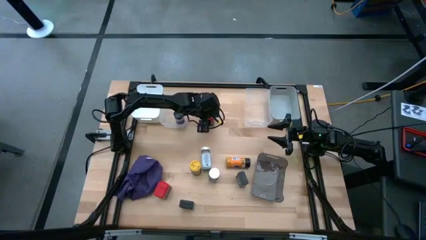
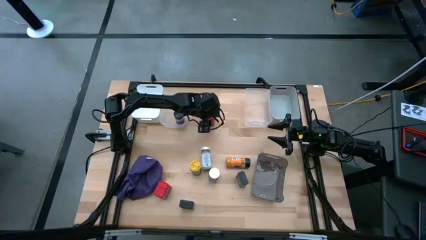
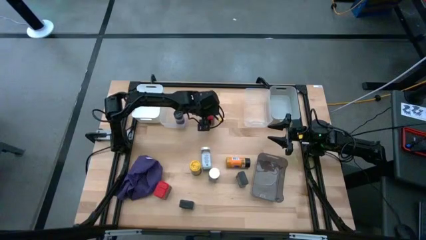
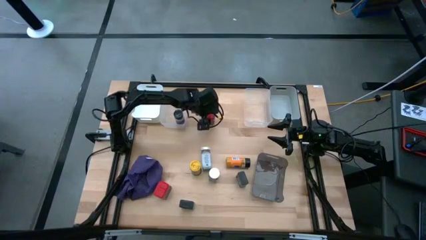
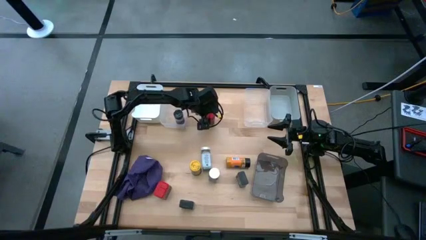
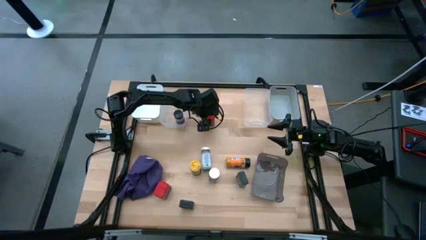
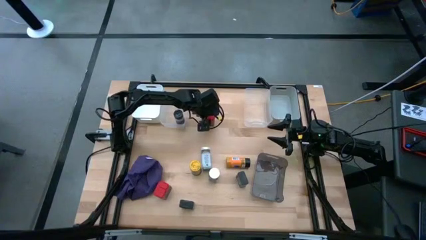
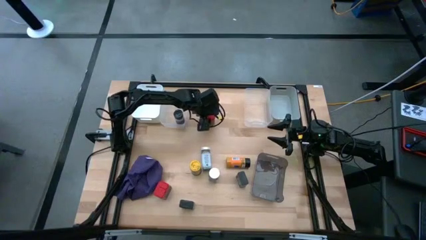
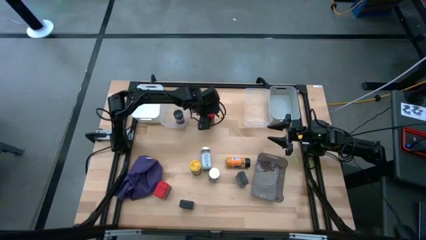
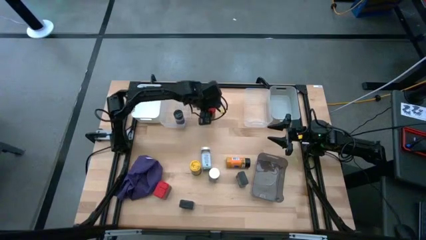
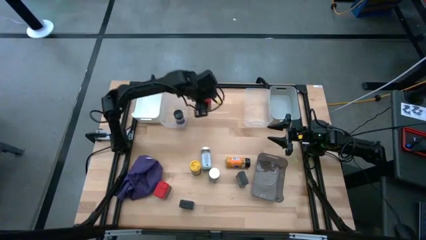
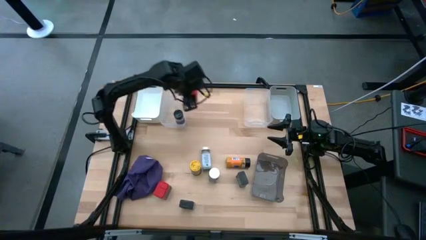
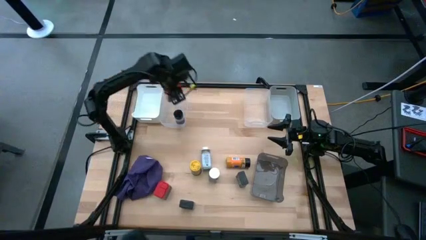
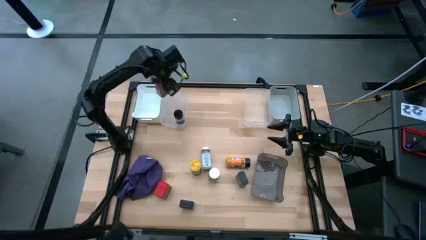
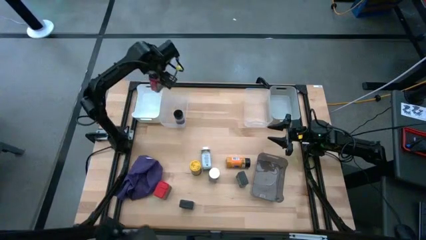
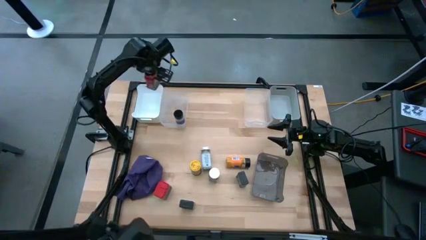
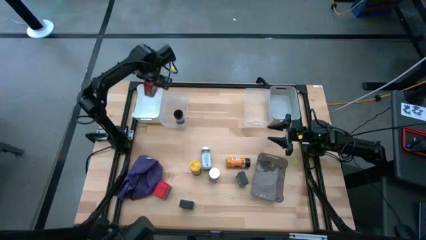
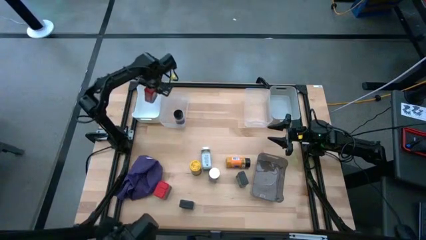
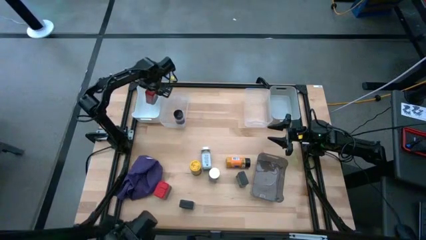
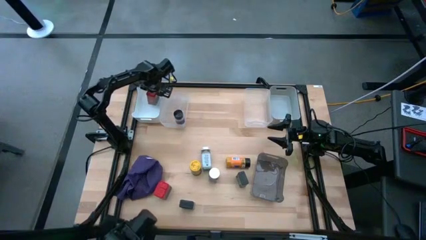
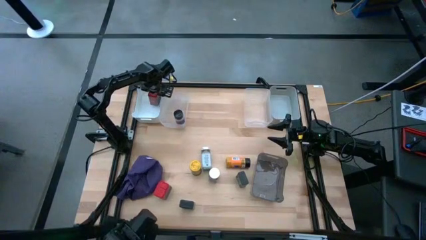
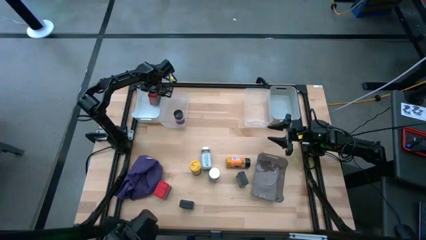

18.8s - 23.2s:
Task: Sort spices by type
Put the top red seasoning can into the white bin

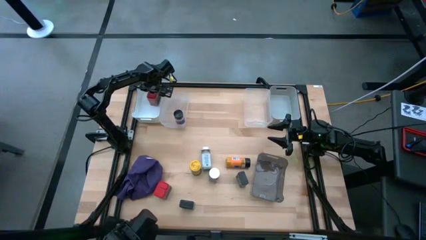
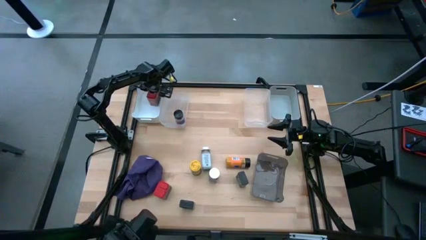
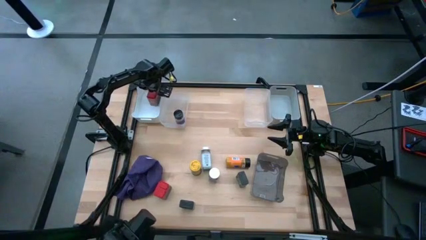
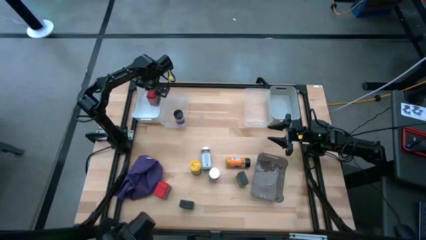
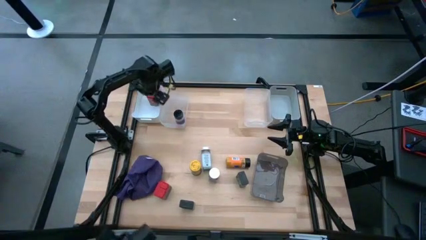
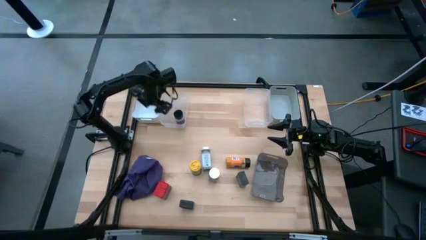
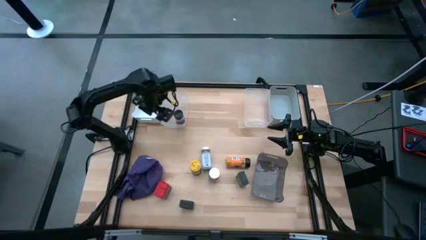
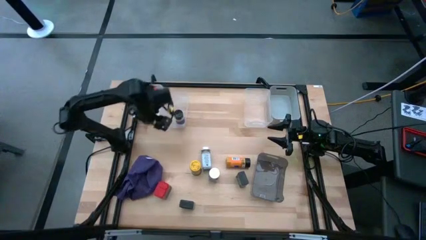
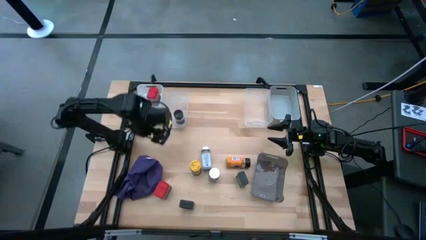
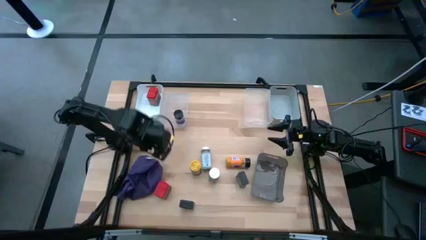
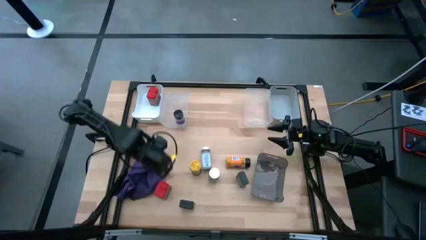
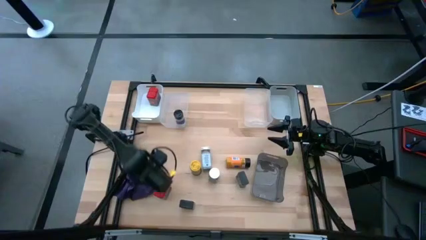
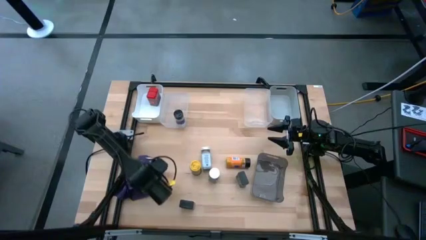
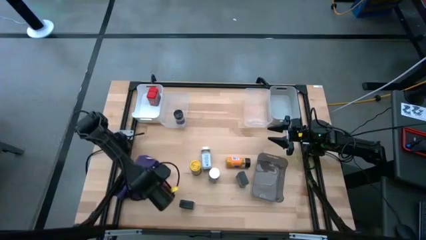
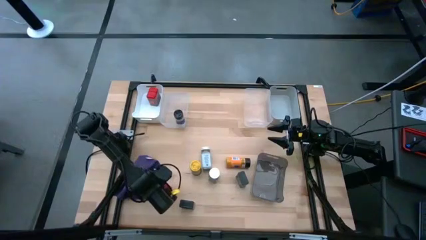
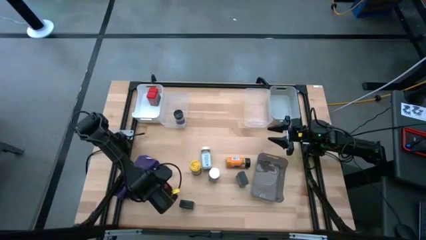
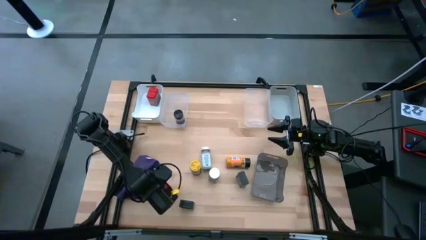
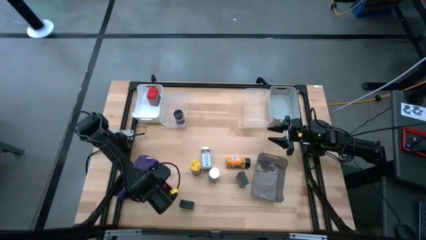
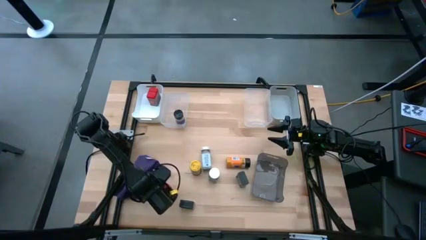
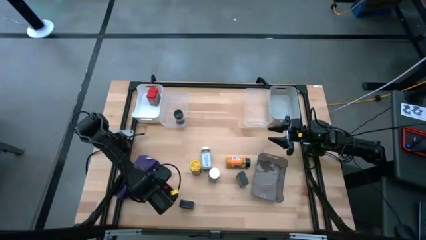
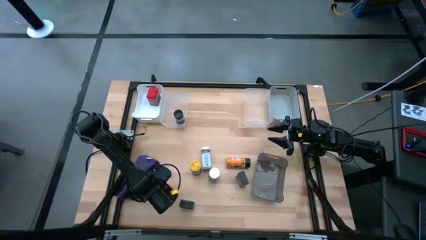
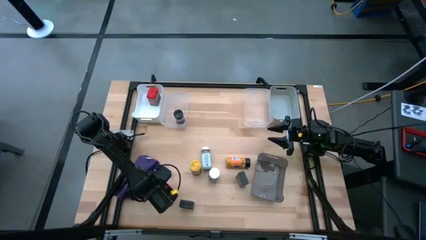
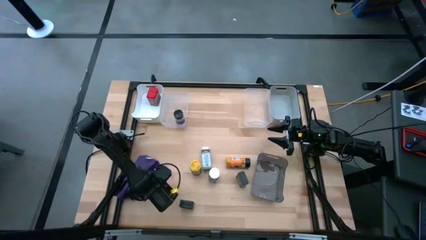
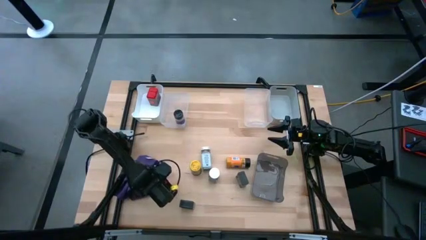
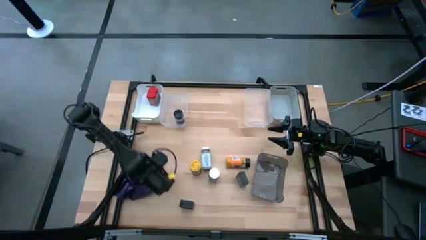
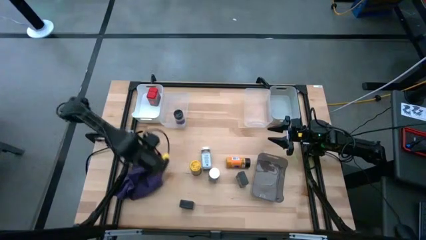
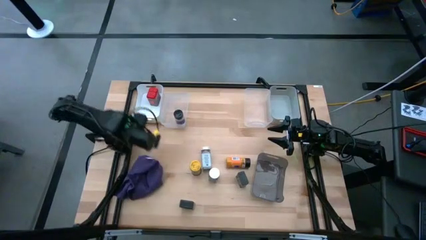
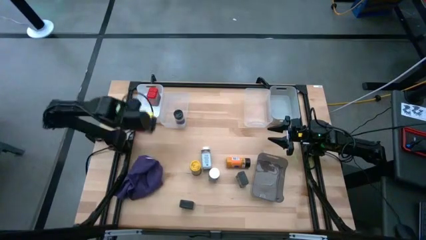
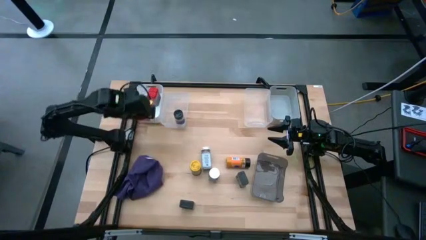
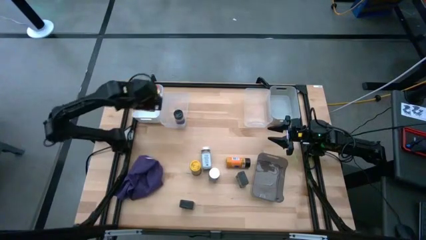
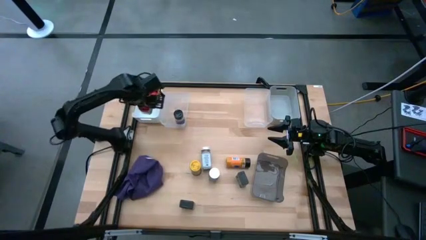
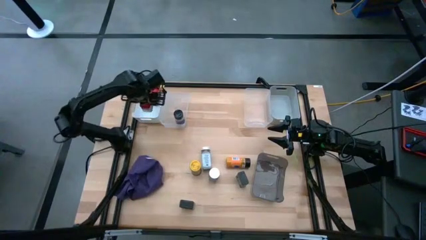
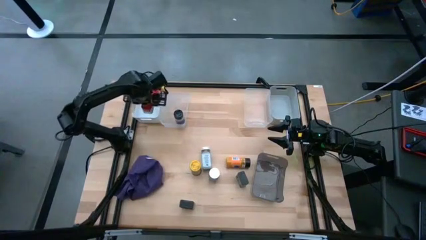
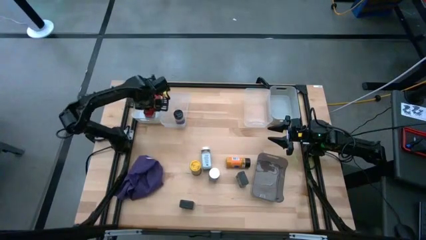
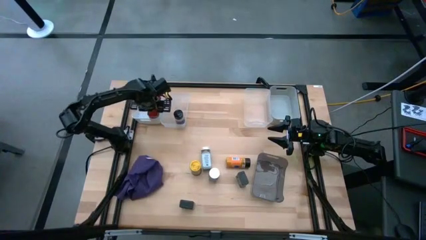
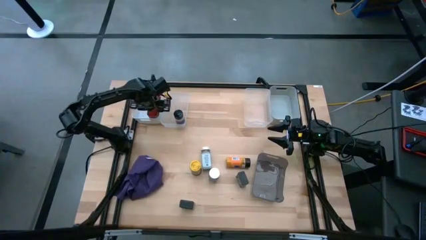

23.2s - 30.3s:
Put the red seasoning can into the white bin

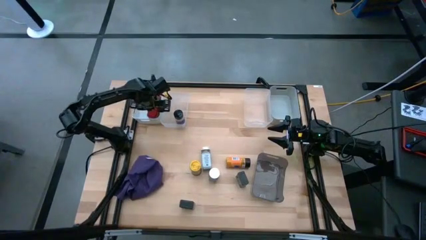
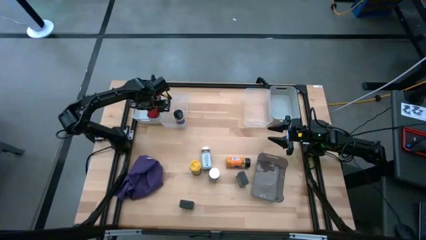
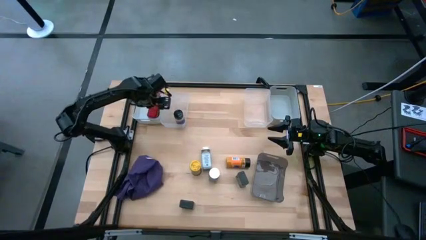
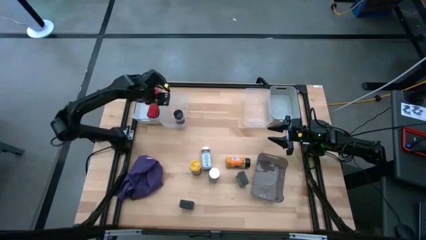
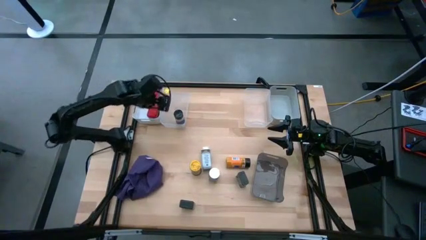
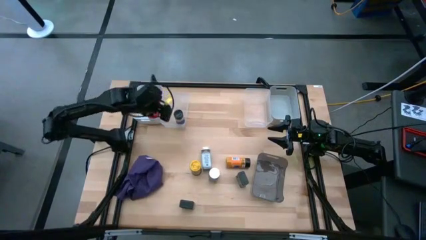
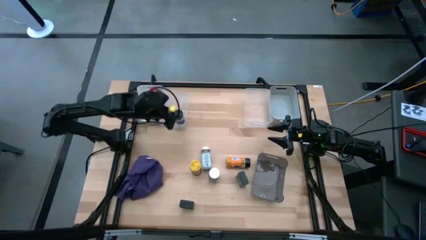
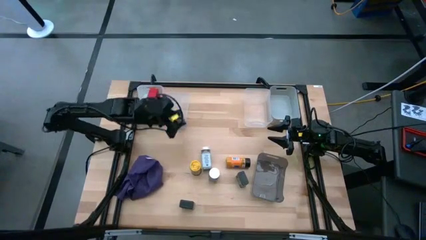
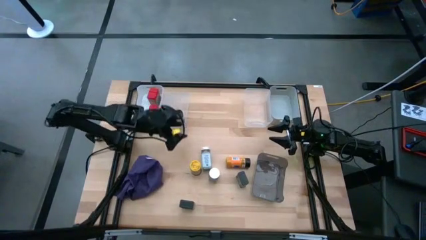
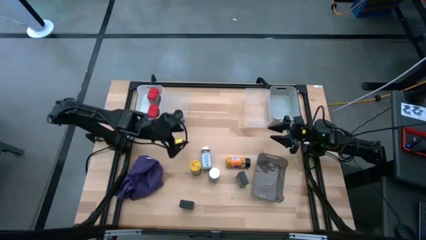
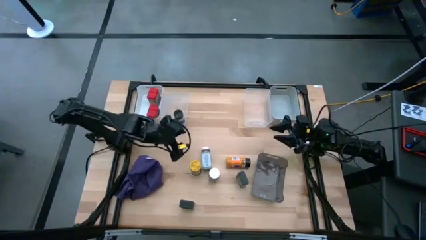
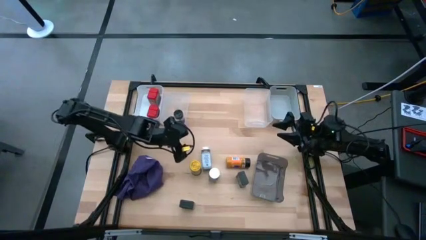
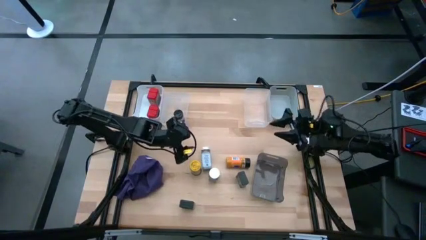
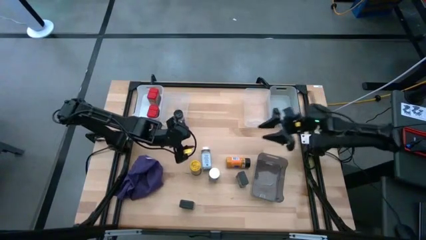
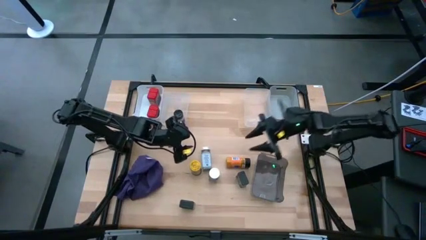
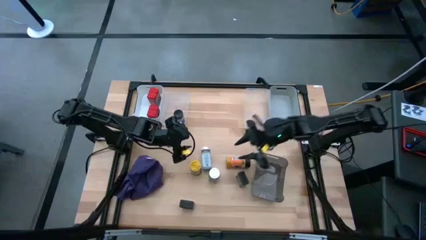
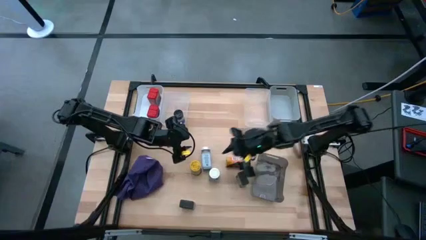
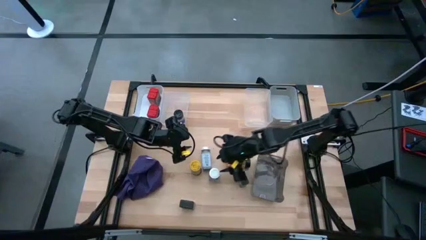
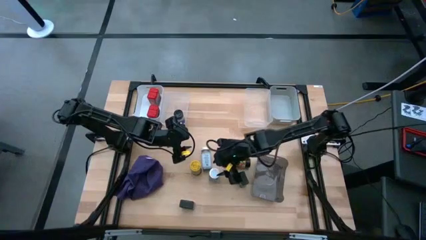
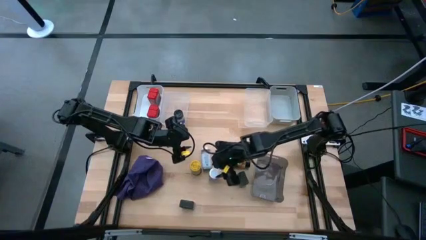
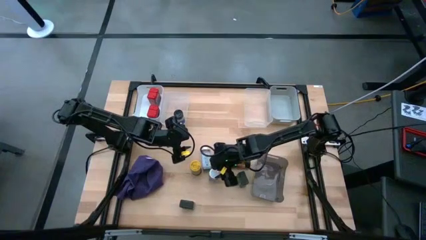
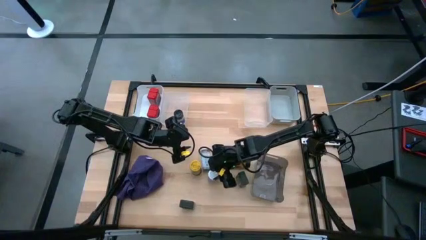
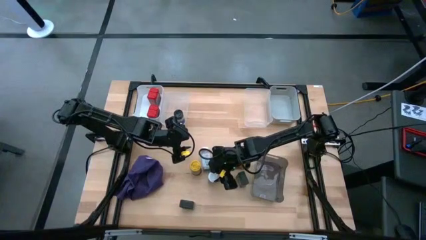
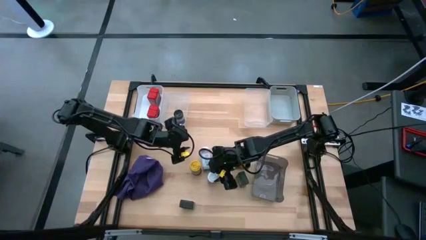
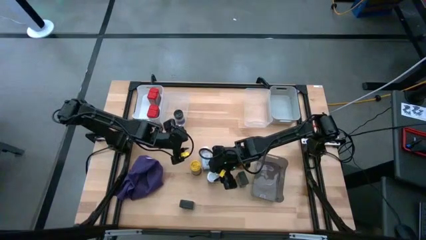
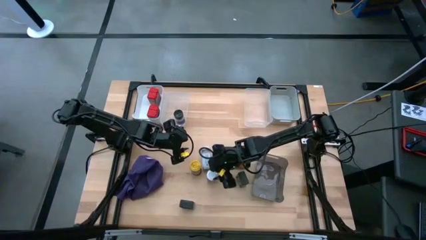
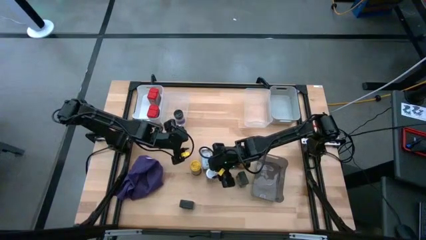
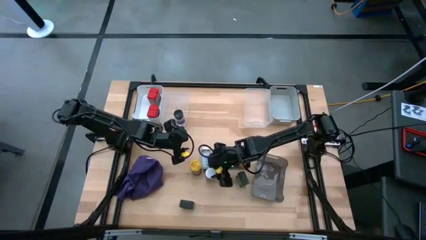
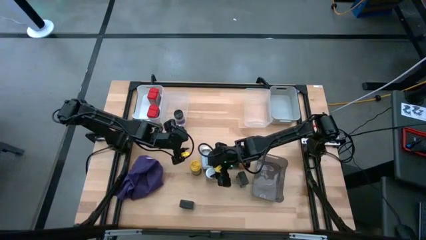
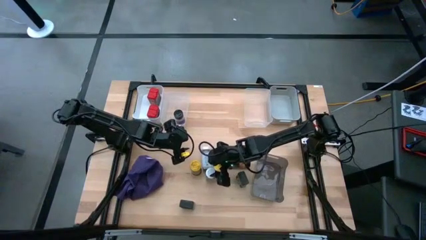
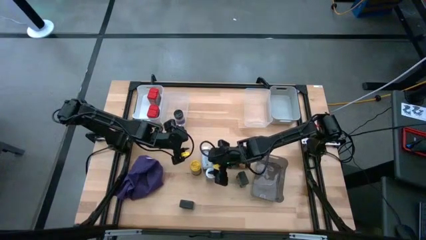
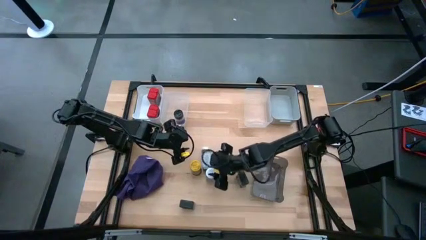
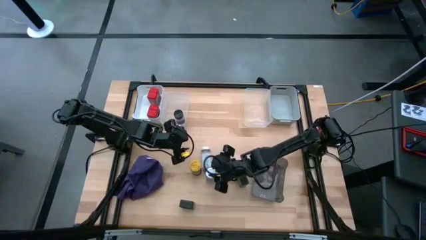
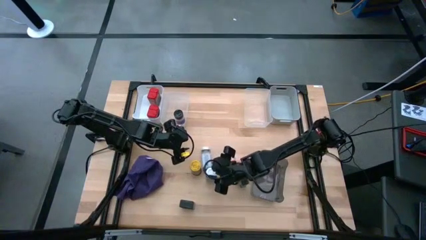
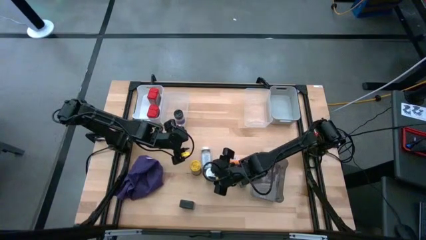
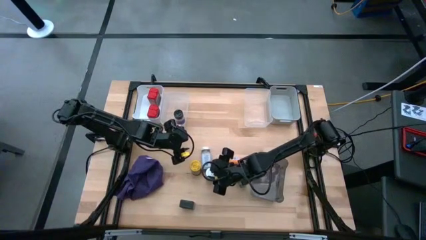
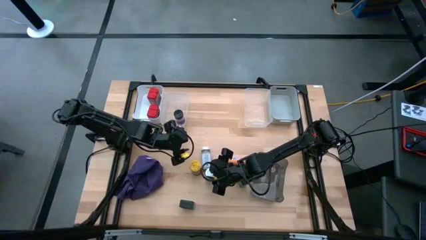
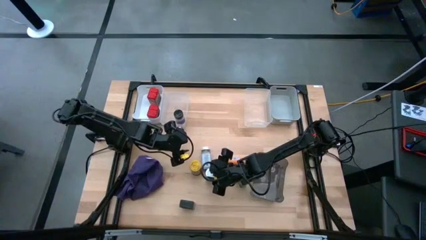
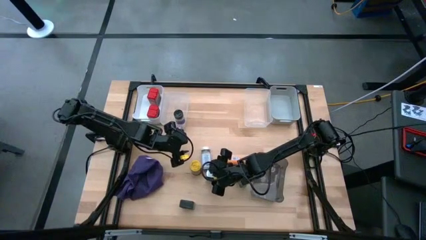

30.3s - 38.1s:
Put the bottom white seasoning bottle into the right transparent bin
